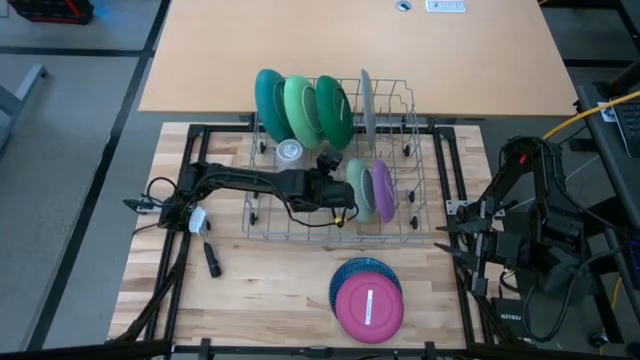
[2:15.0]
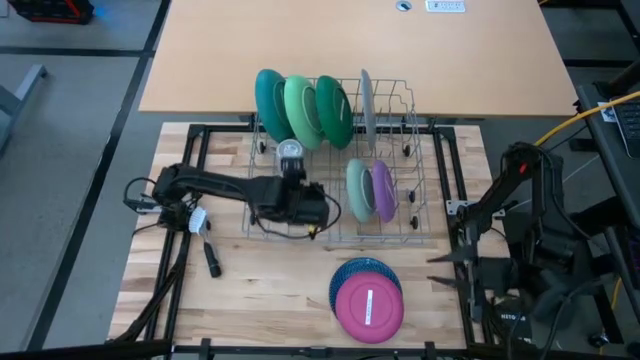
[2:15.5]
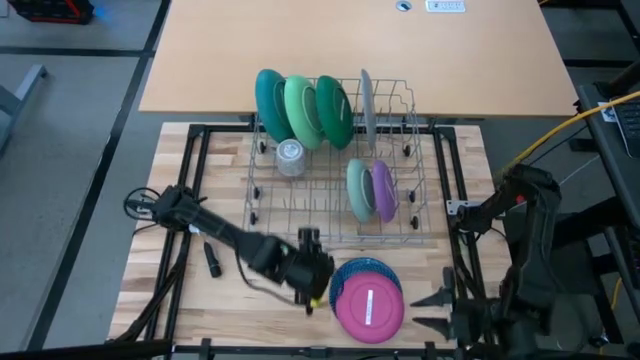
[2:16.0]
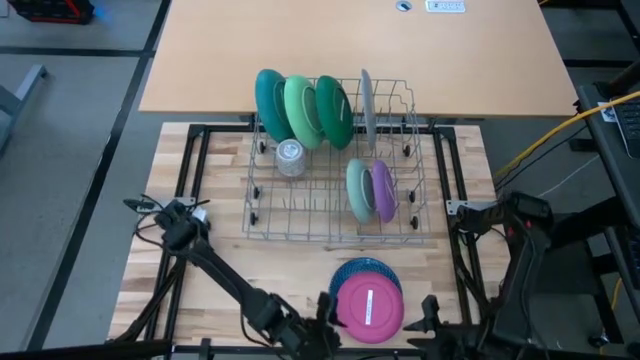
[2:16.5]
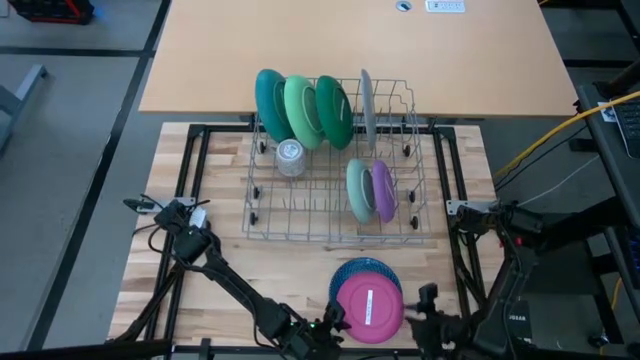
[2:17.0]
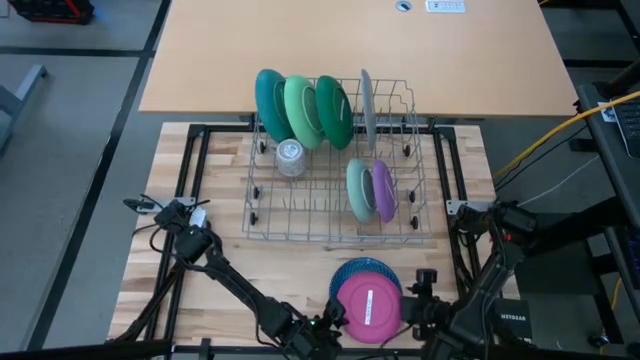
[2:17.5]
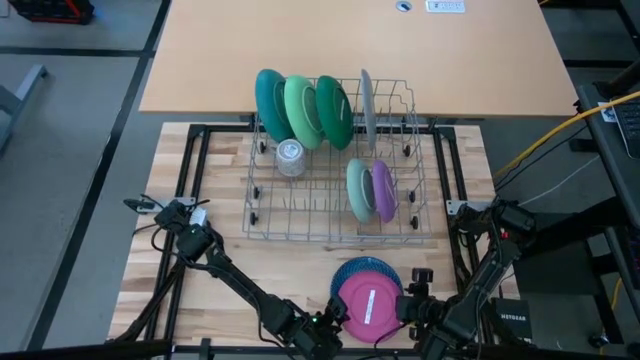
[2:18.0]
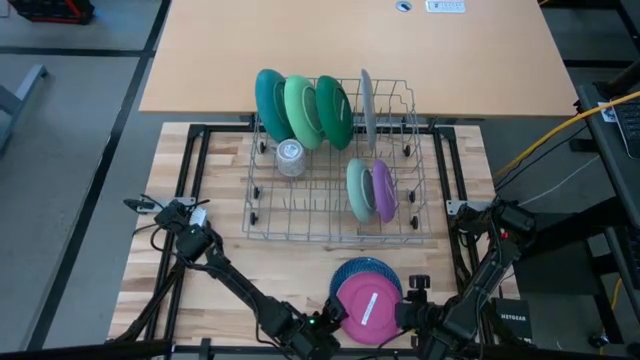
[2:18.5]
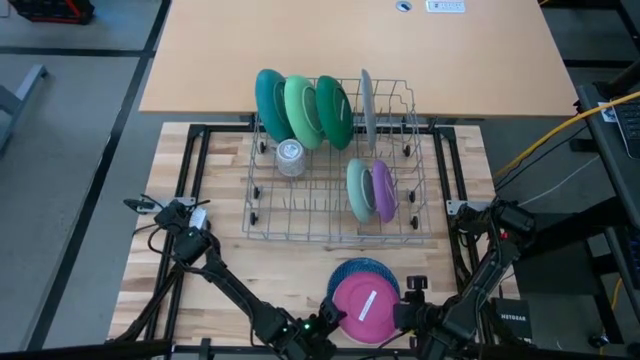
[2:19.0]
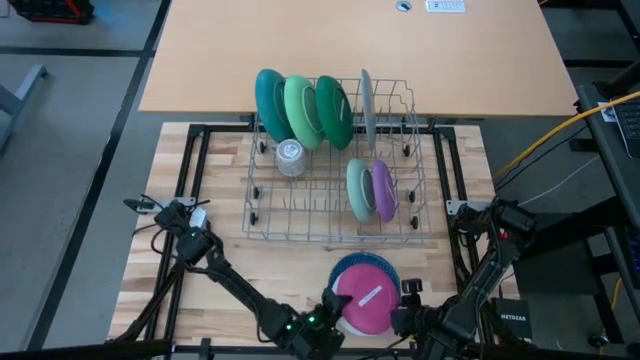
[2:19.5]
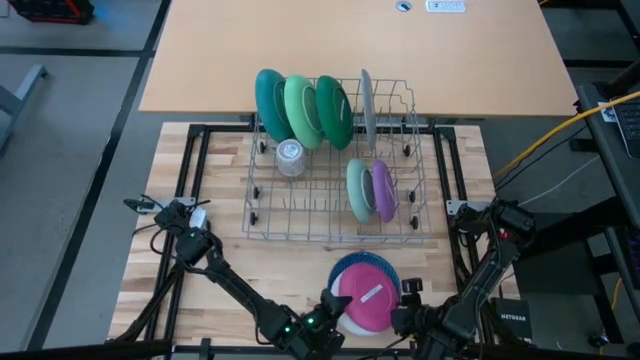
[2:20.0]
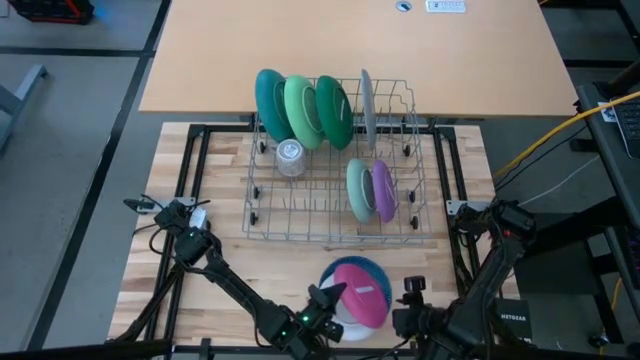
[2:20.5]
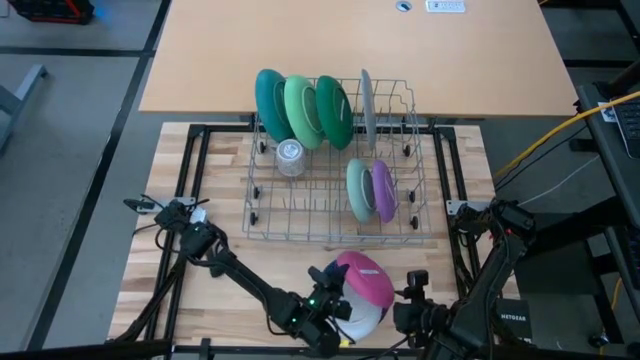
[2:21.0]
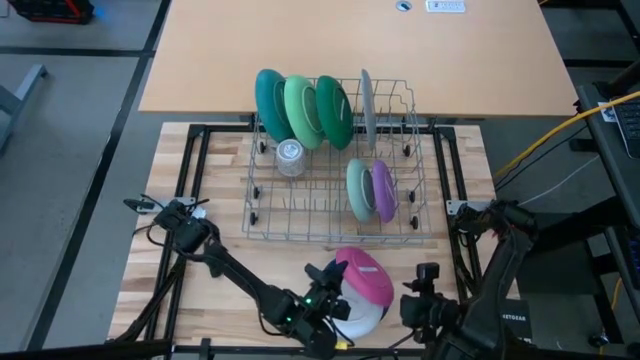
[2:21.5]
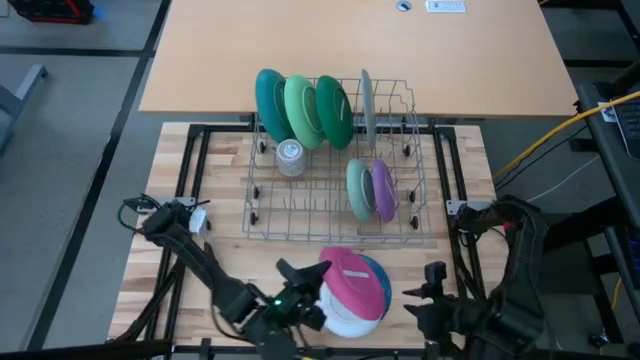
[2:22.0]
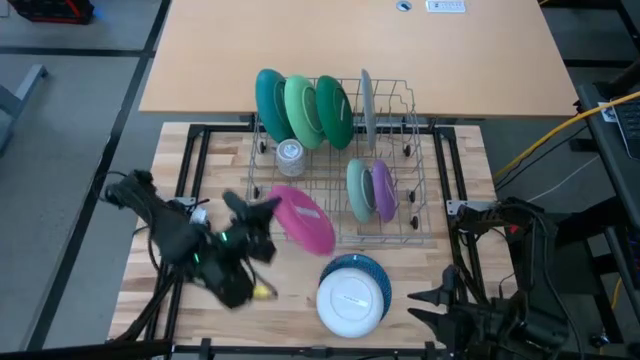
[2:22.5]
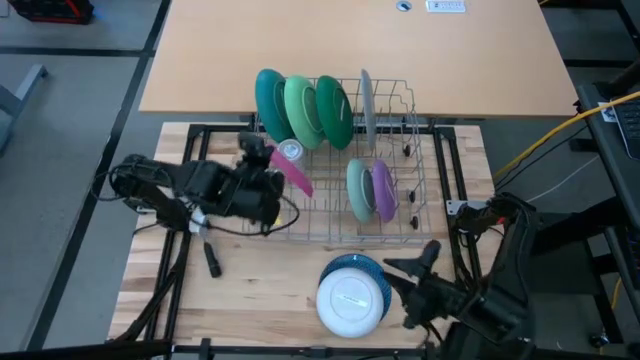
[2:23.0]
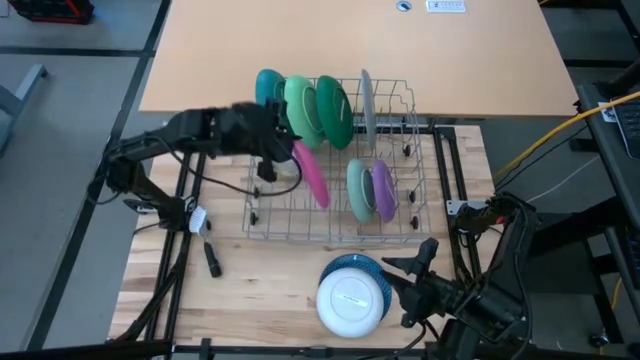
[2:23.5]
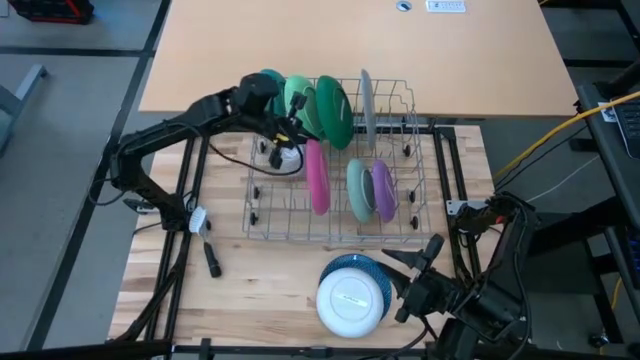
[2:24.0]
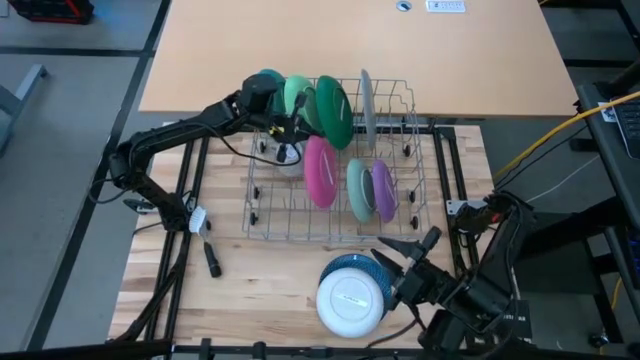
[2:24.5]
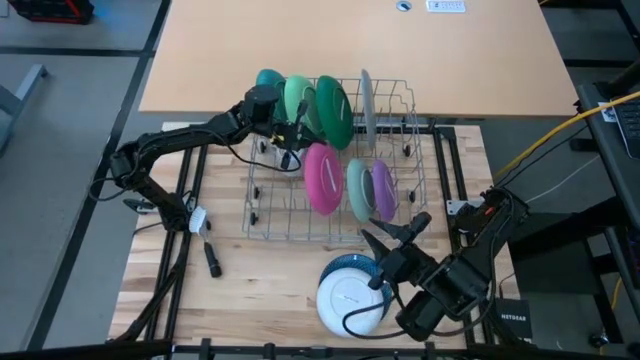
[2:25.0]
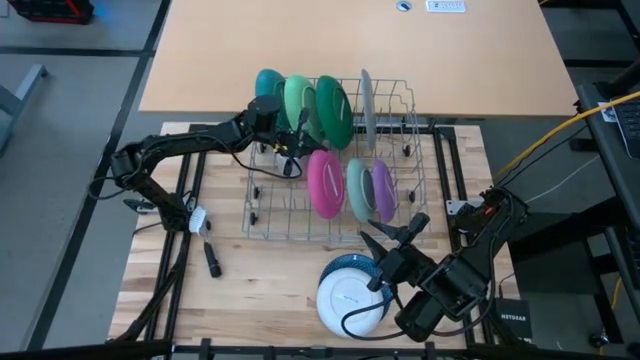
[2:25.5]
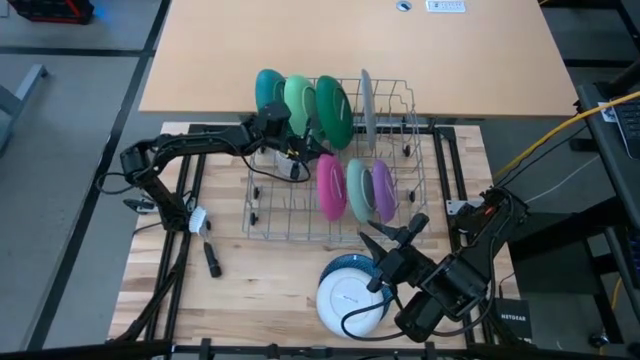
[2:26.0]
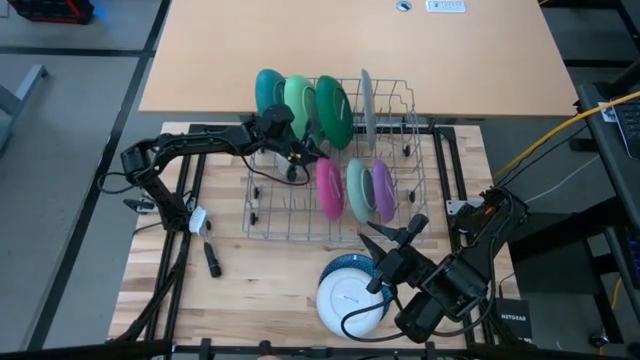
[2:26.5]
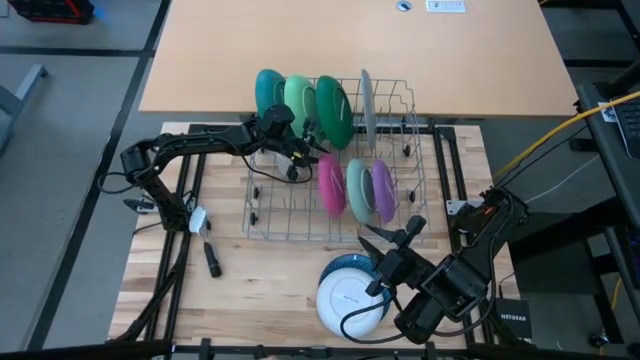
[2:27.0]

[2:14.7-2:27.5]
Task: Sort dishes
Put the pink plate in the dish rack

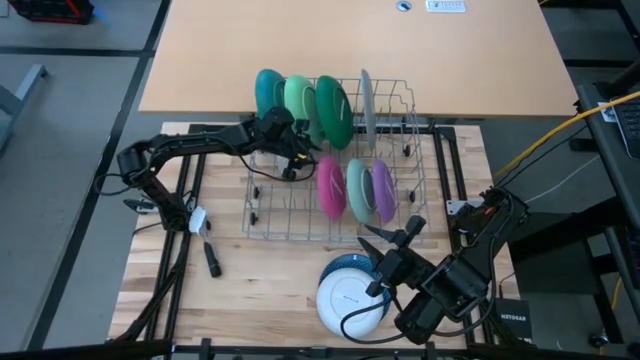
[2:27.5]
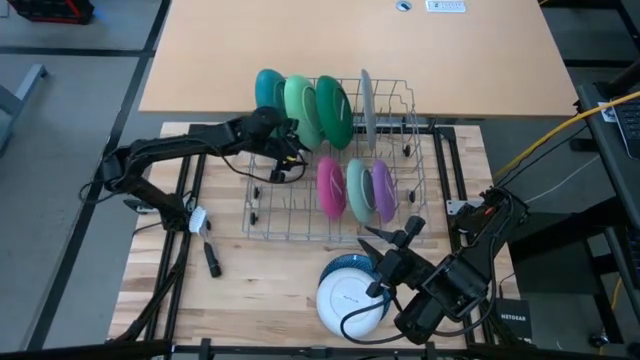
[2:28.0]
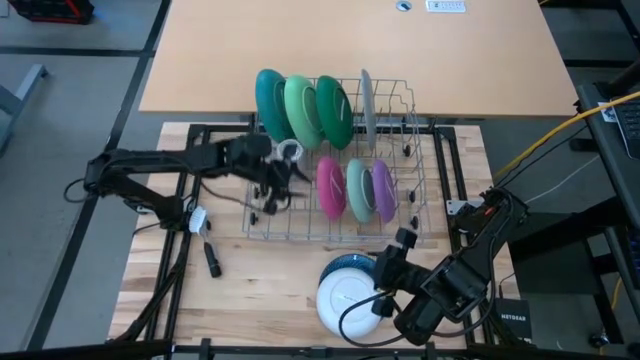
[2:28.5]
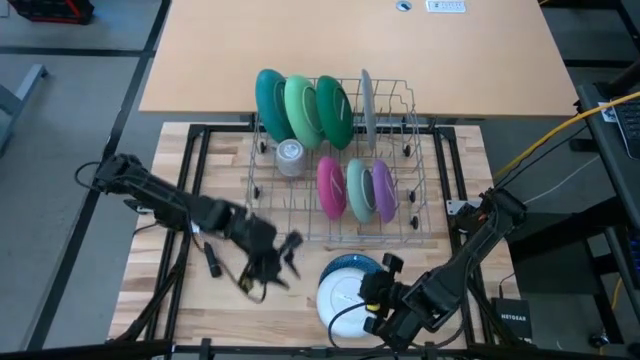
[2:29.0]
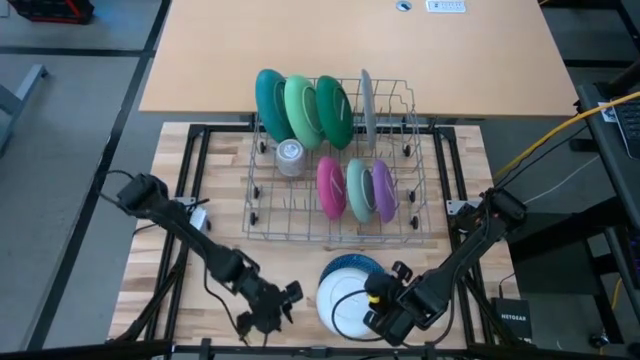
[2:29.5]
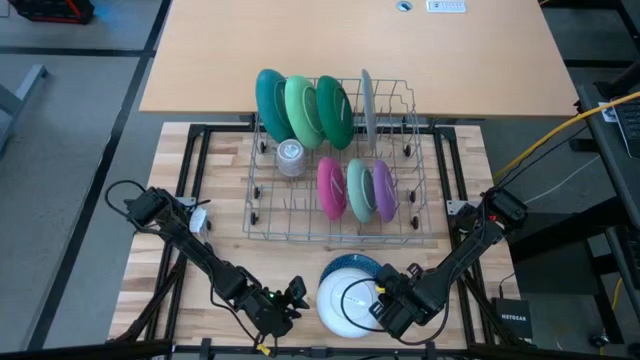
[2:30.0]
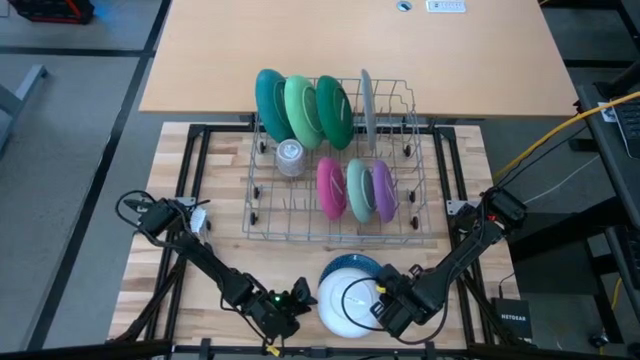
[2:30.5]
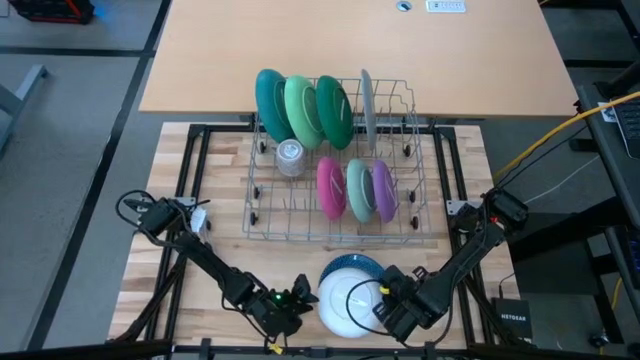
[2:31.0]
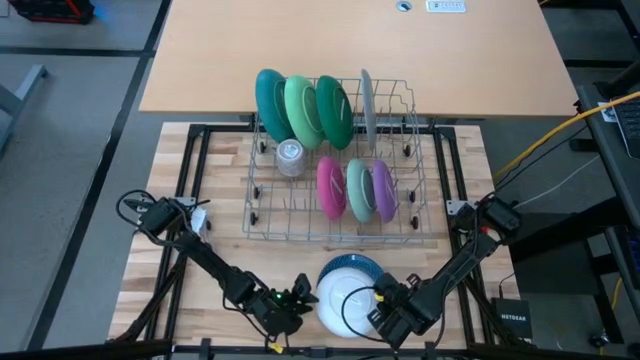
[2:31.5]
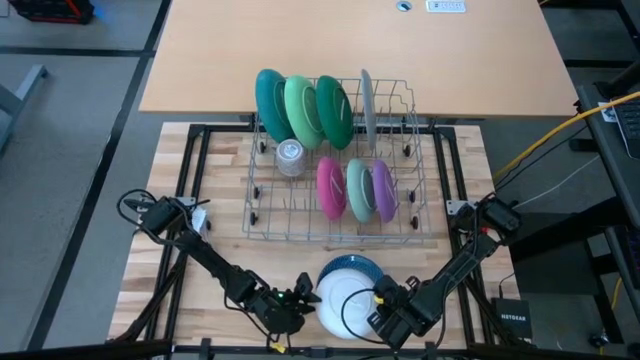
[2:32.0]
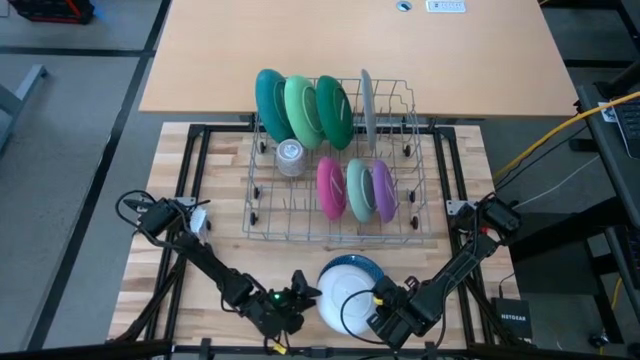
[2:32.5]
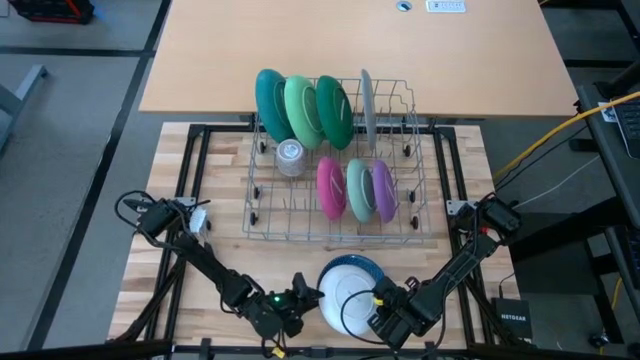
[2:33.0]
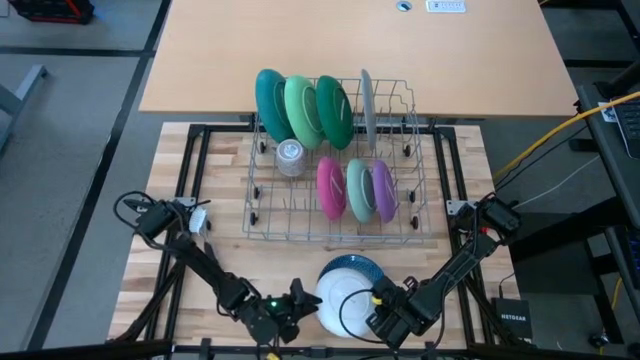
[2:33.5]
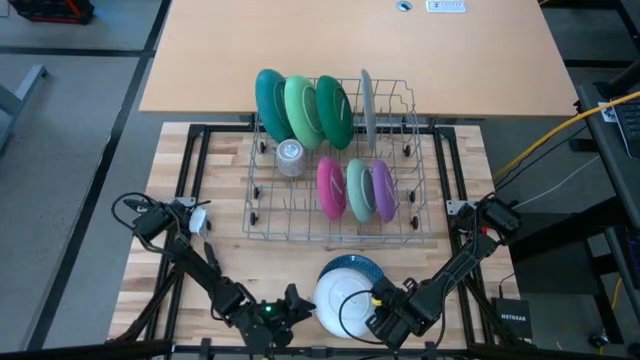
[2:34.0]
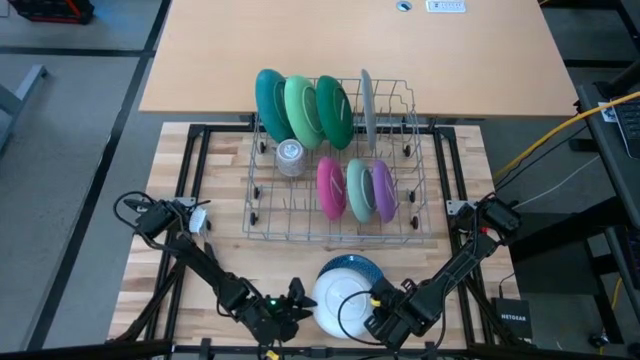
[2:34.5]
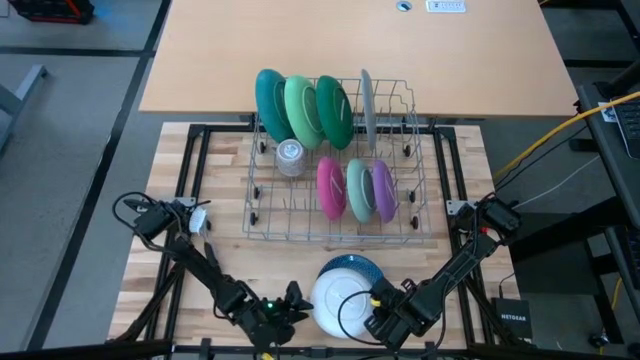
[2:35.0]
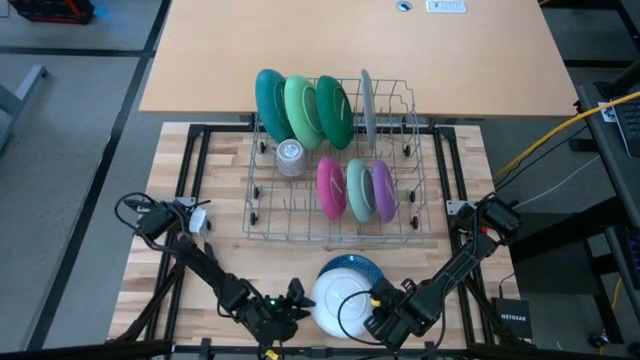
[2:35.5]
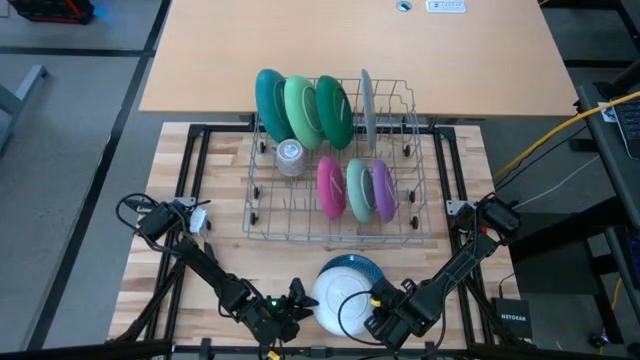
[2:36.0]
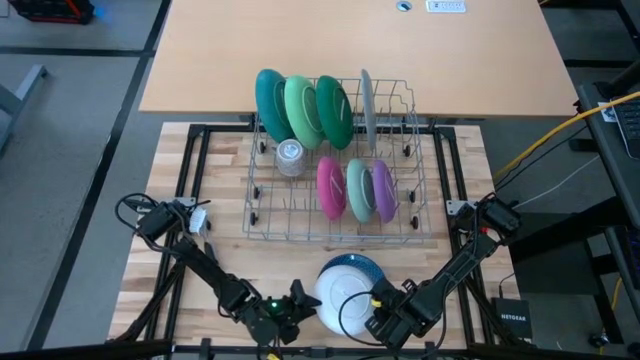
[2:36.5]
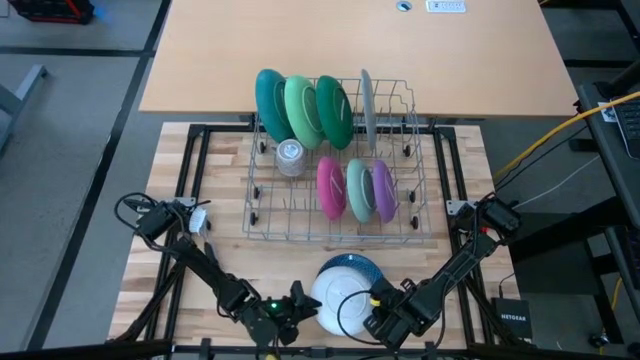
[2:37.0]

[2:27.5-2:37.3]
Put the white plate in the dish rack
